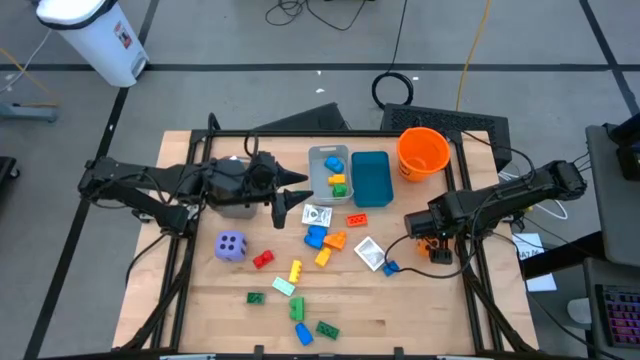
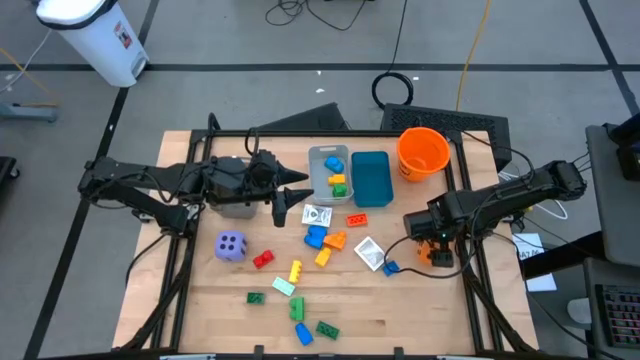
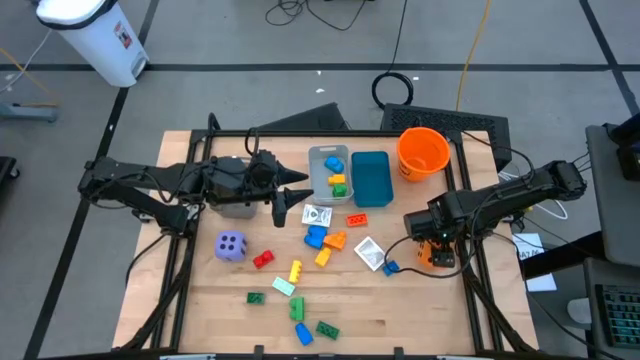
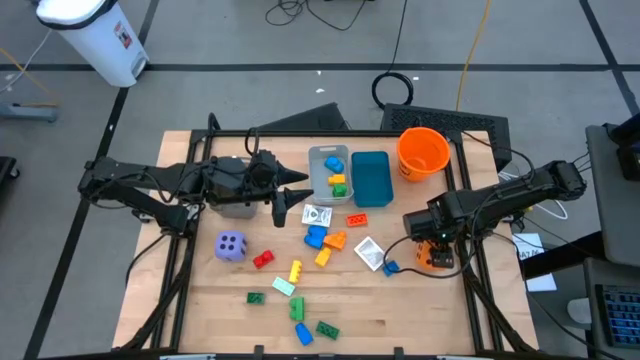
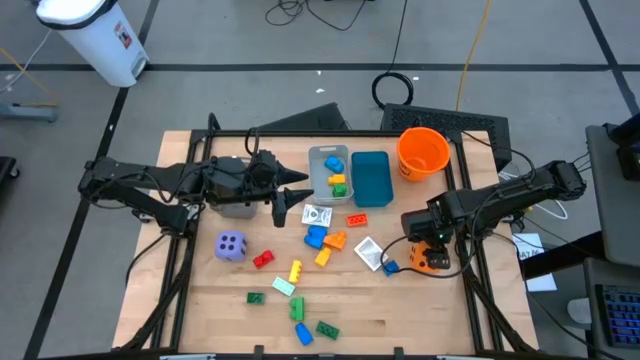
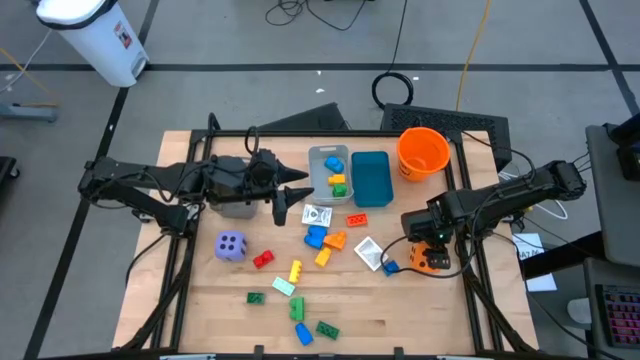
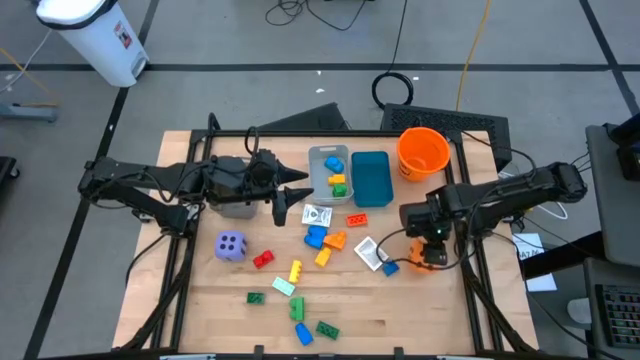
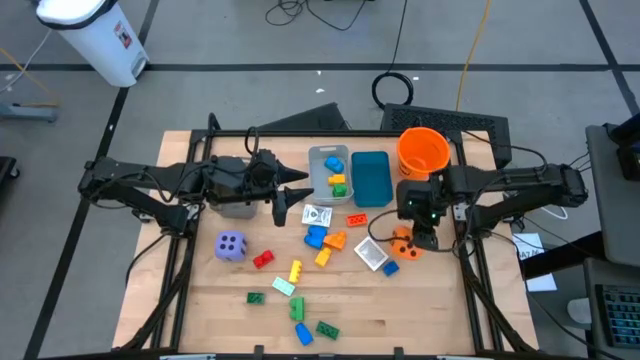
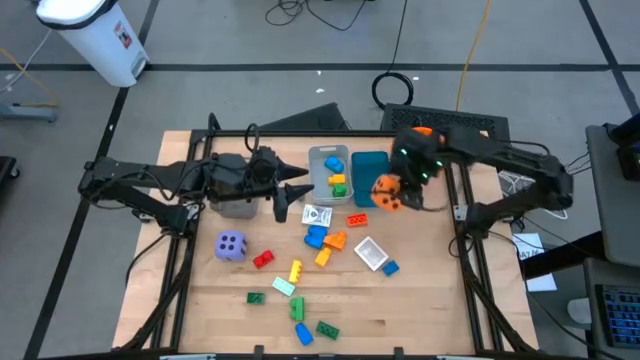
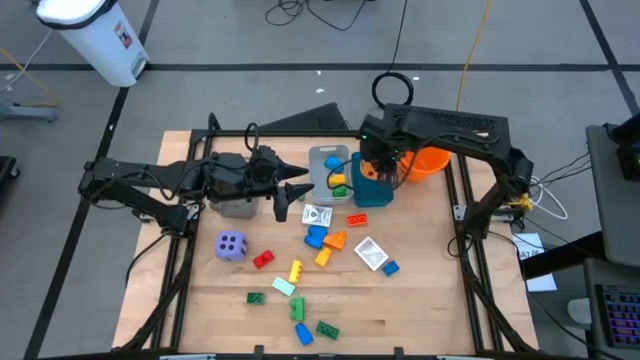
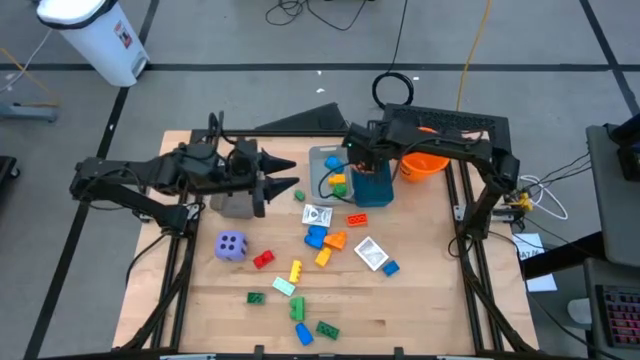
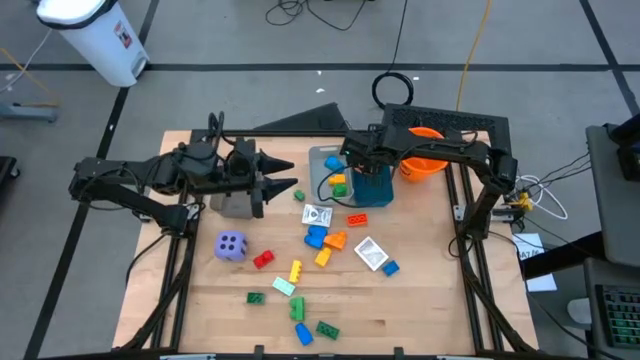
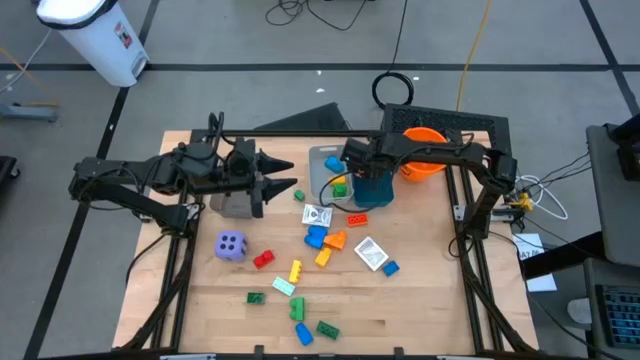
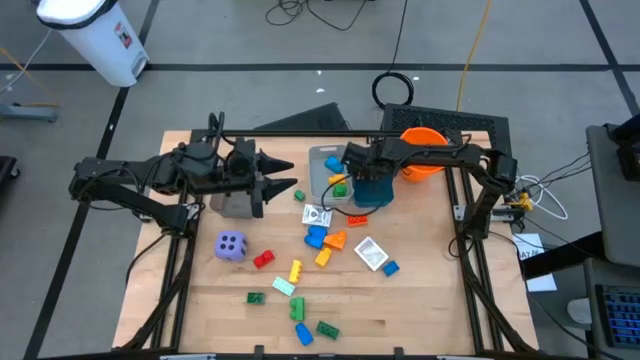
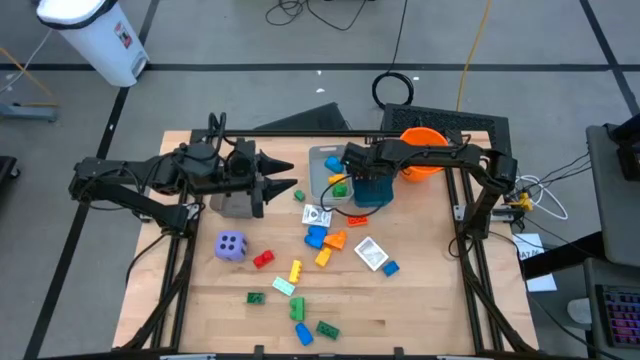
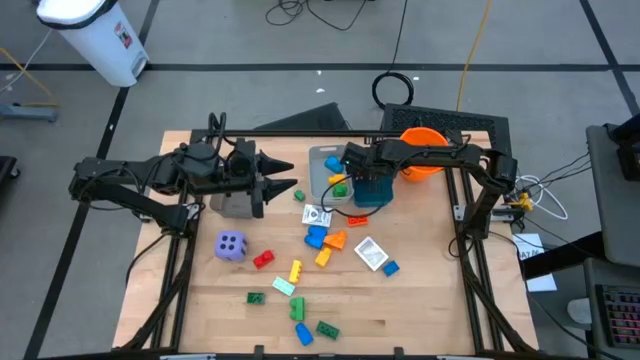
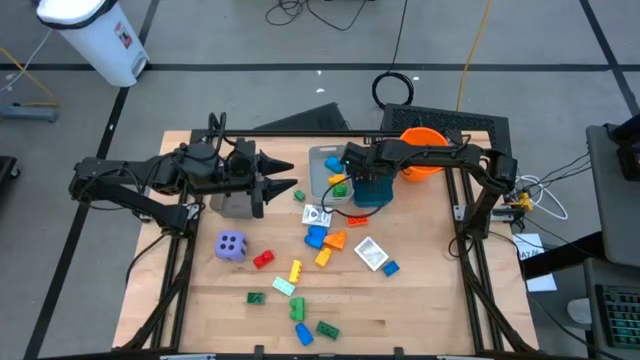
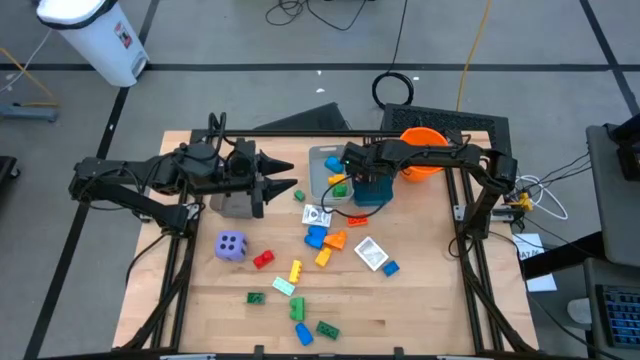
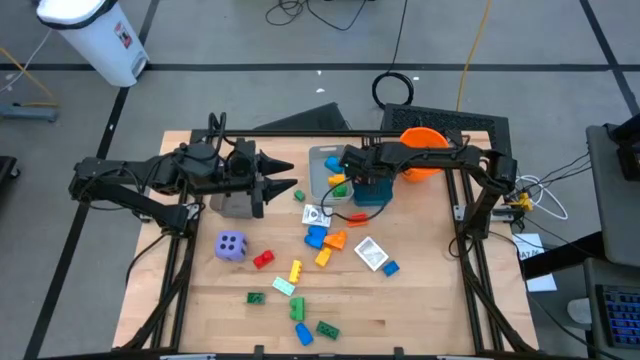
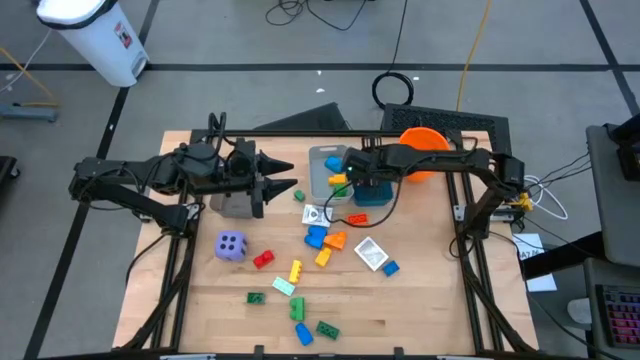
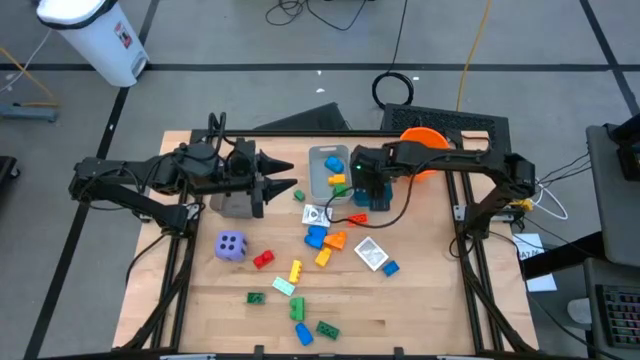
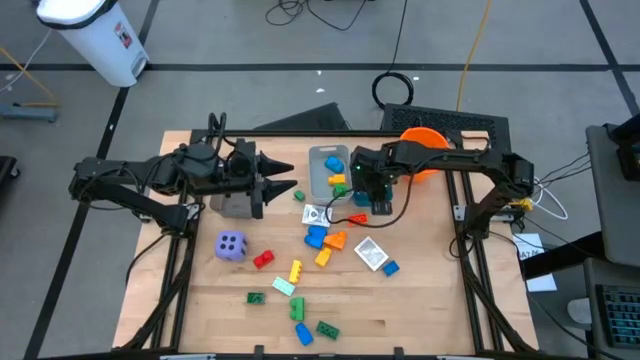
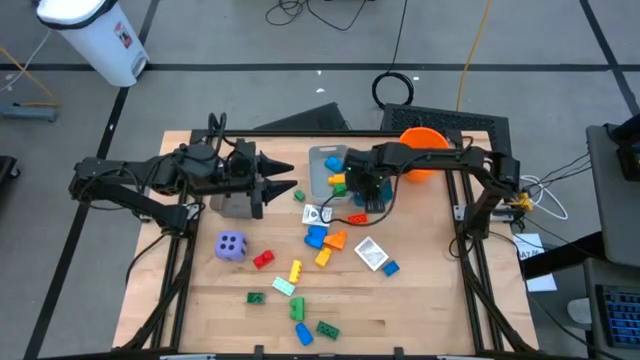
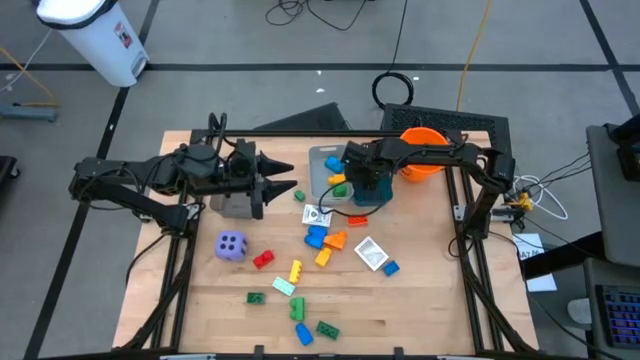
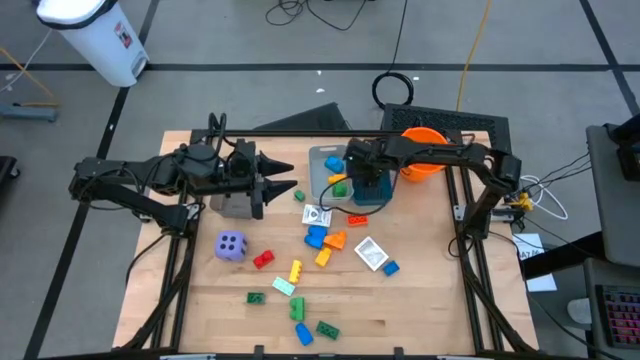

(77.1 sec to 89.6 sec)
Task: Pick & Place Toys
Put the orange dice into the blue bin
